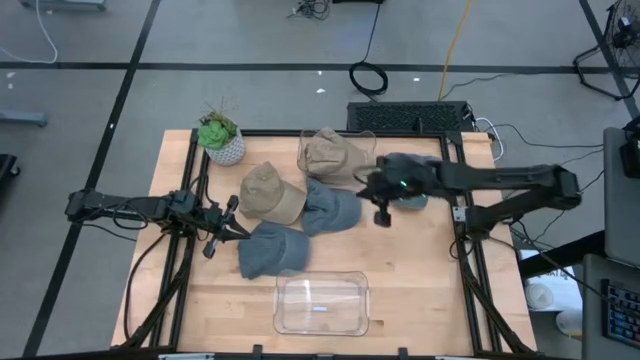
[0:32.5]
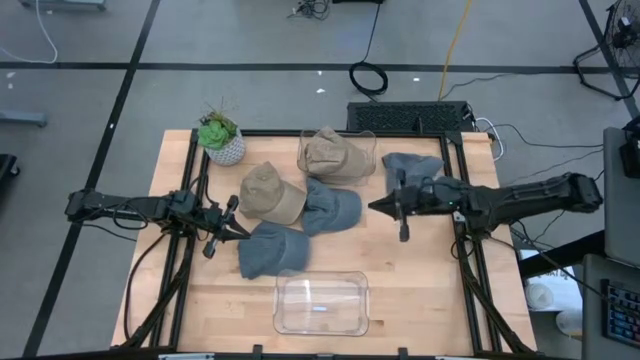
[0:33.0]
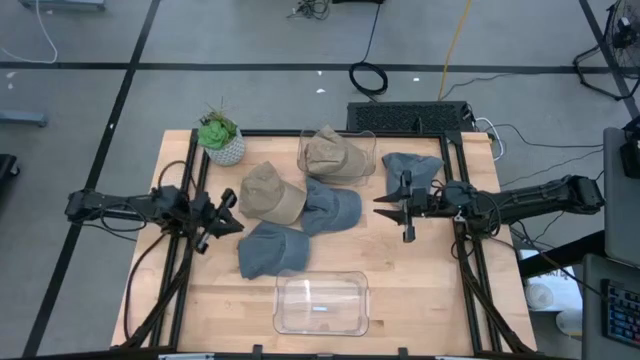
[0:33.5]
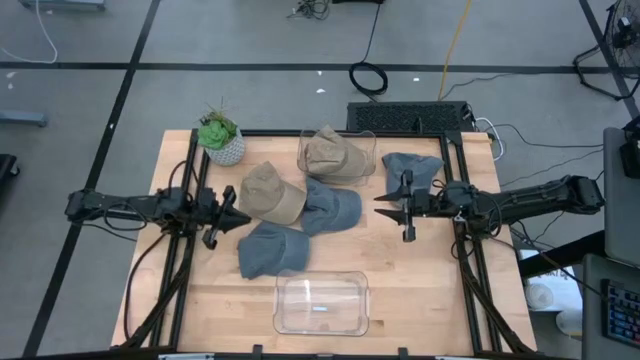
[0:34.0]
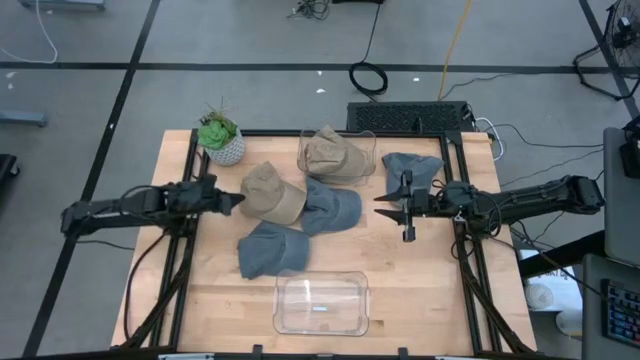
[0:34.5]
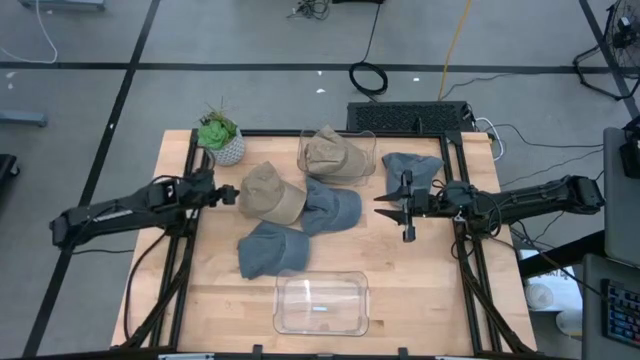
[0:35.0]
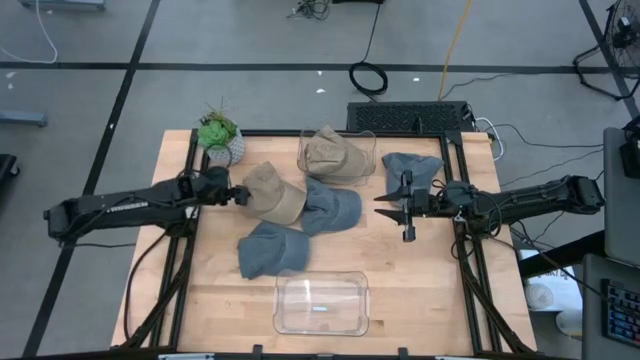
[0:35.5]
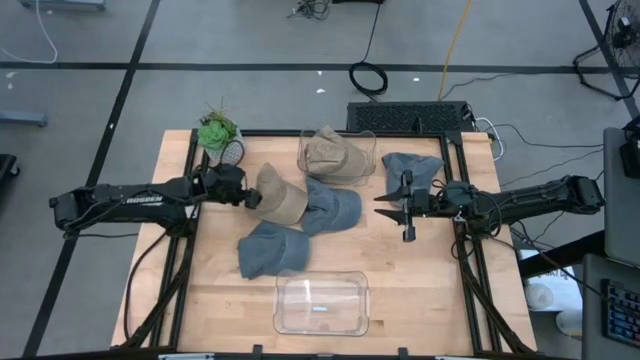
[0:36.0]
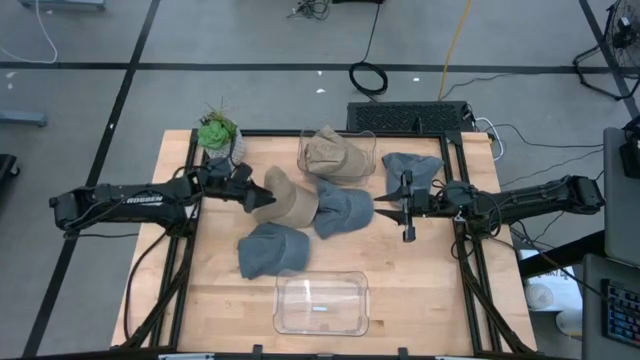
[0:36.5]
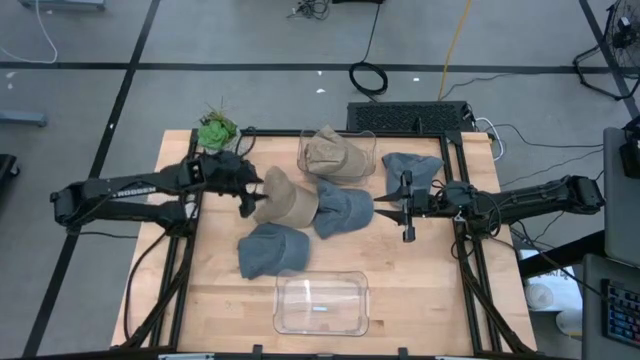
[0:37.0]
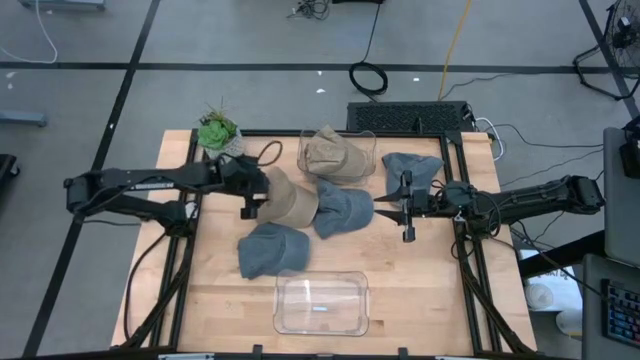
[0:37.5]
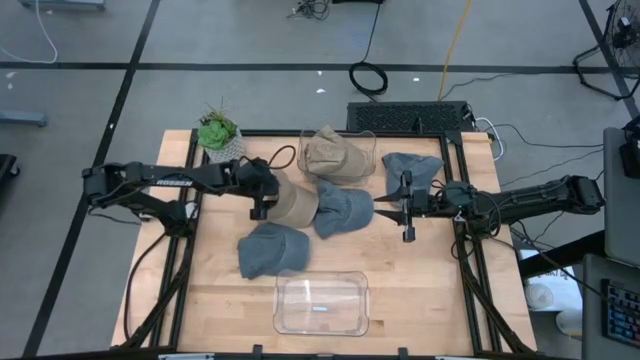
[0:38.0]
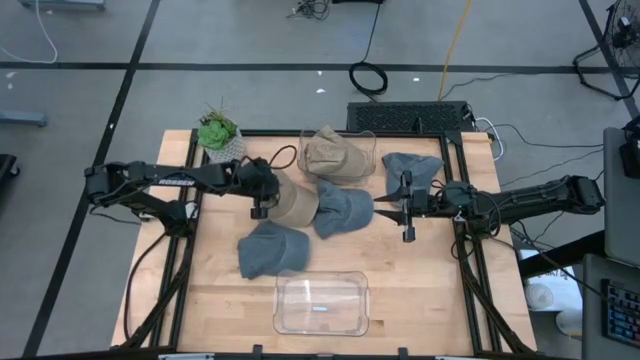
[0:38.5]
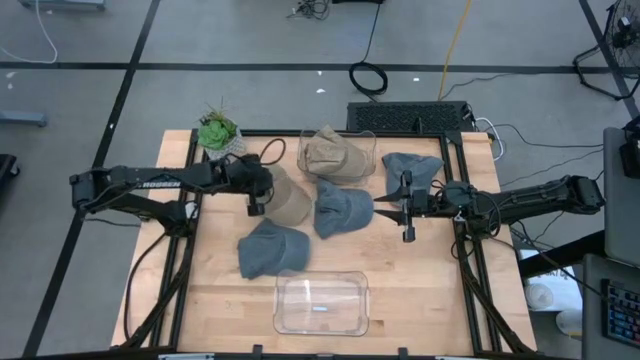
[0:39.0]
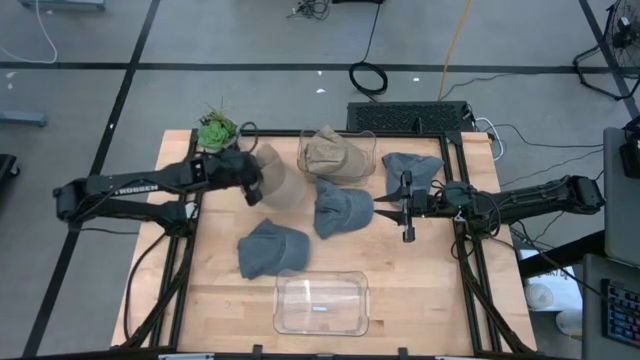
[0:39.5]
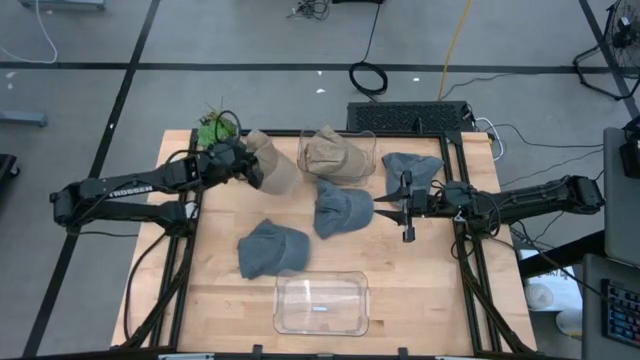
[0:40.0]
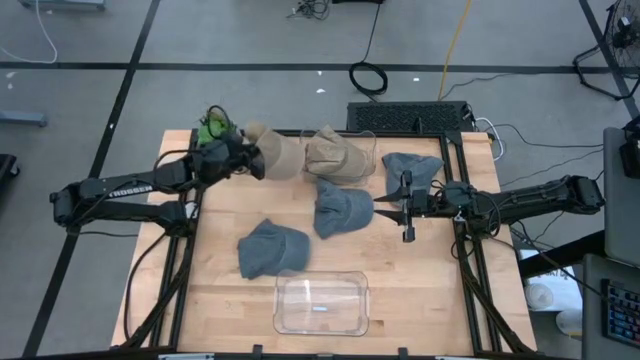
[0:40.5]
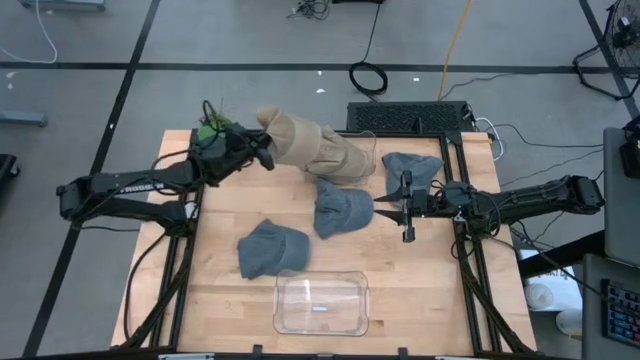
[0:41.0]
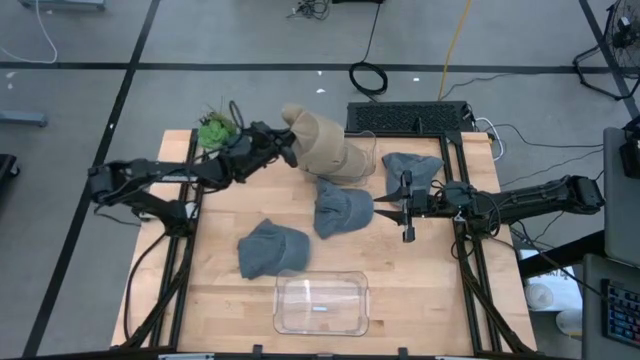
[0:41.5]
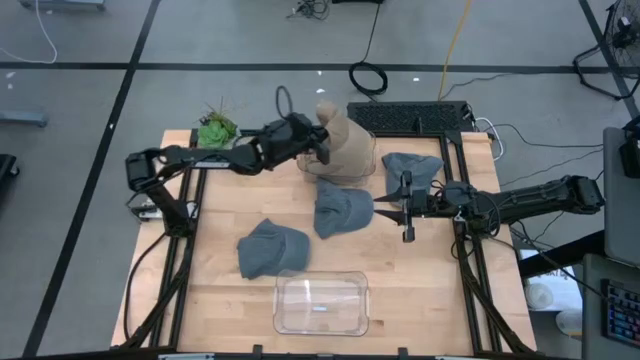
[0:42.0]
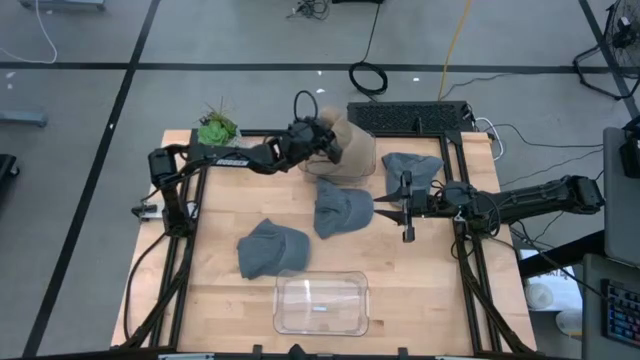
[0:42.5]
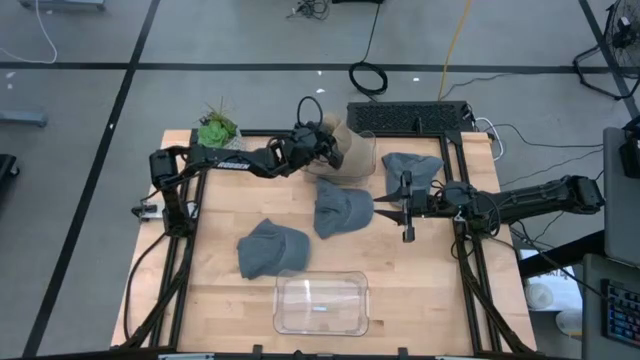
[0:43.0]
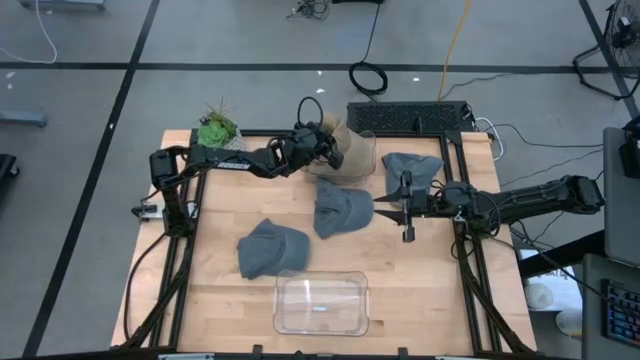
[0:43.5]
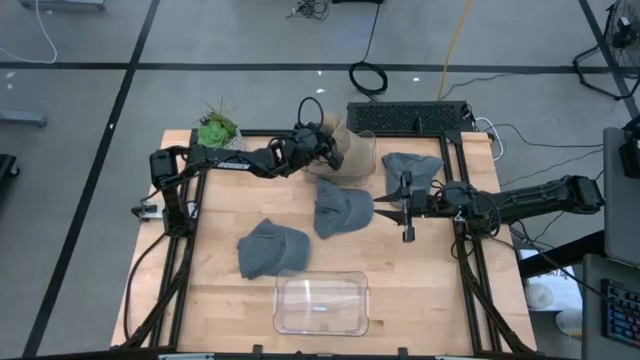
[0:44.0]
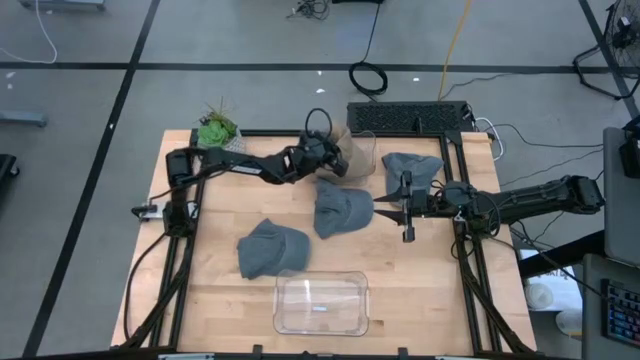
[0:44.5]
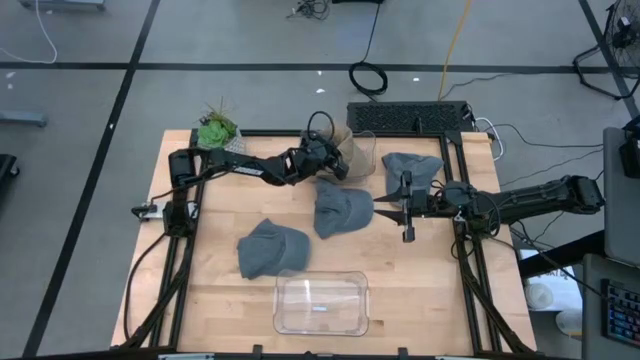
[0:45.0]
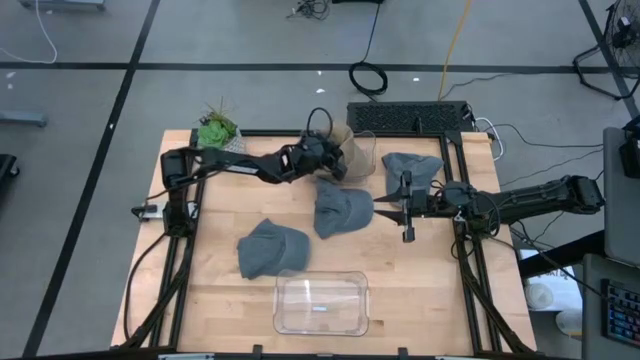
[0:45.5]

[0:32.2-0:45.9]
Task: Pick & Place hat
Put the brown cap into the top transparent bin

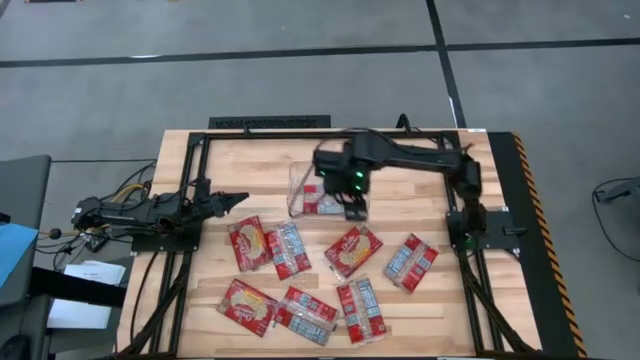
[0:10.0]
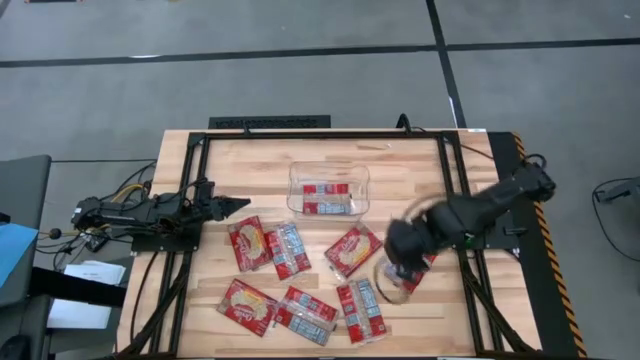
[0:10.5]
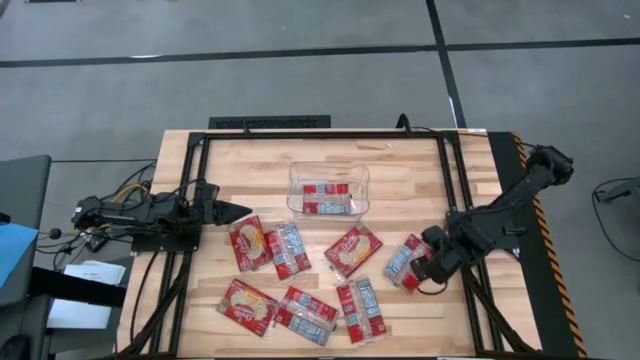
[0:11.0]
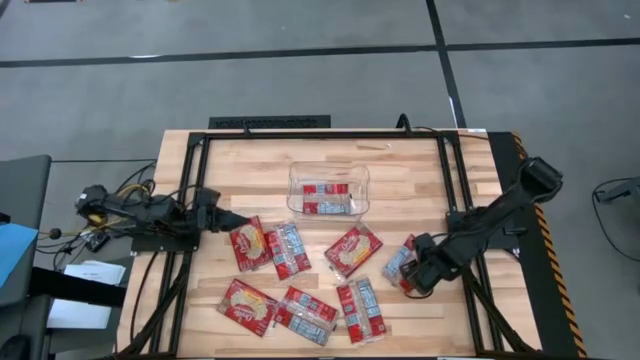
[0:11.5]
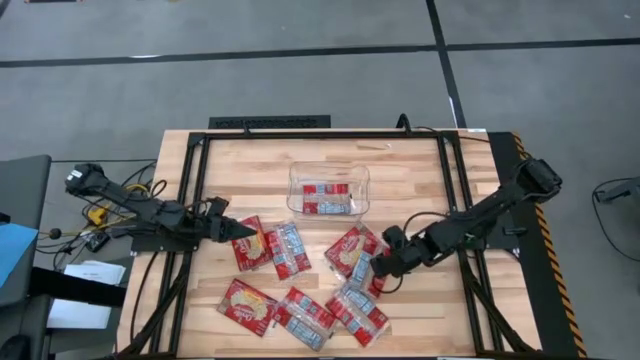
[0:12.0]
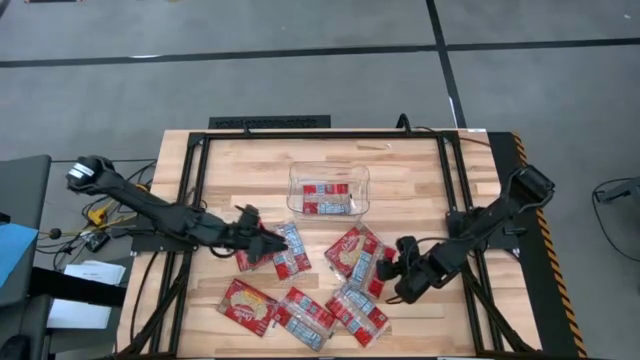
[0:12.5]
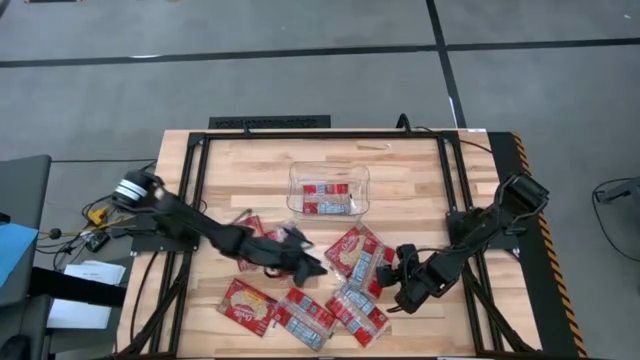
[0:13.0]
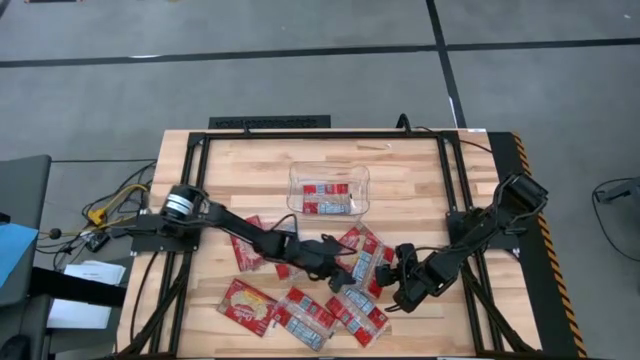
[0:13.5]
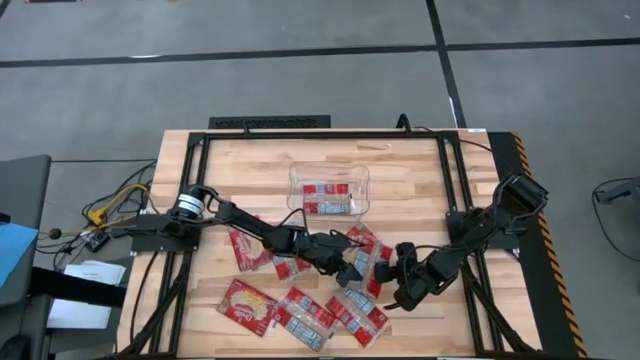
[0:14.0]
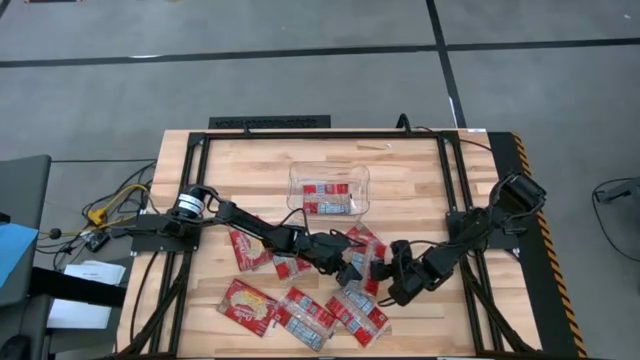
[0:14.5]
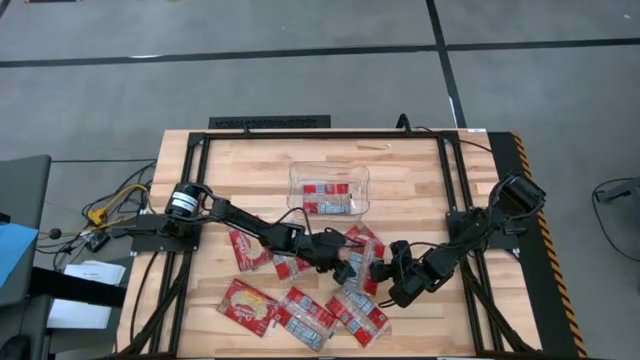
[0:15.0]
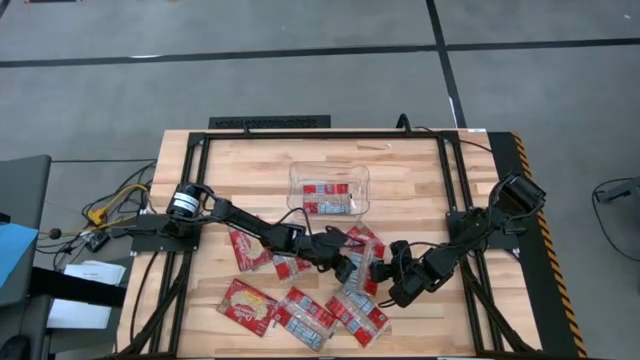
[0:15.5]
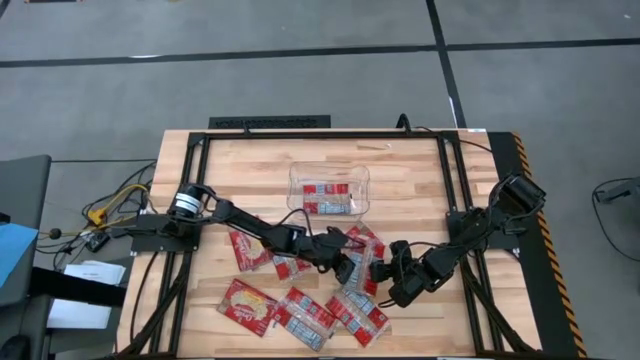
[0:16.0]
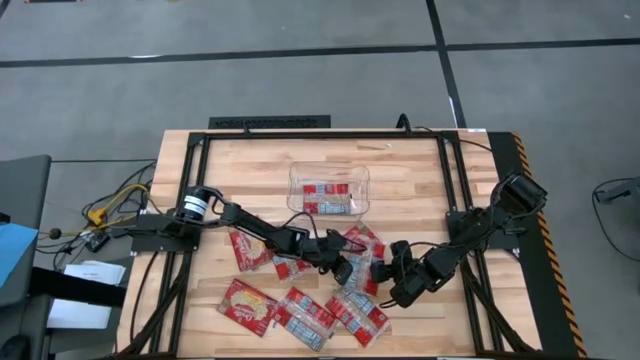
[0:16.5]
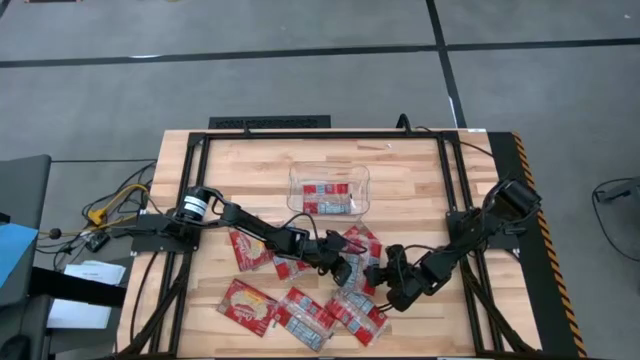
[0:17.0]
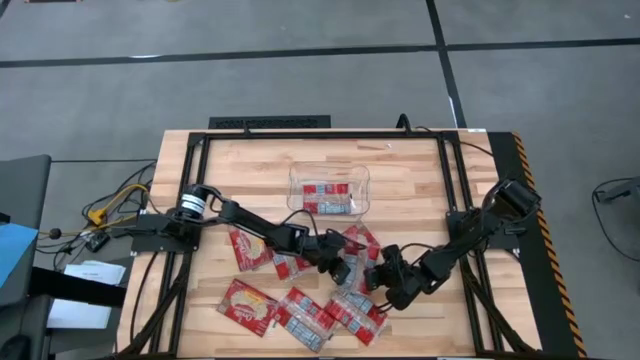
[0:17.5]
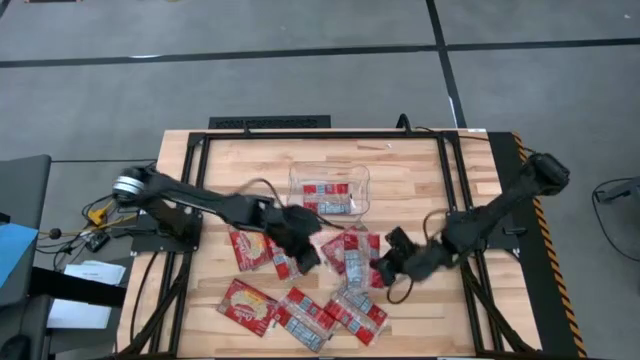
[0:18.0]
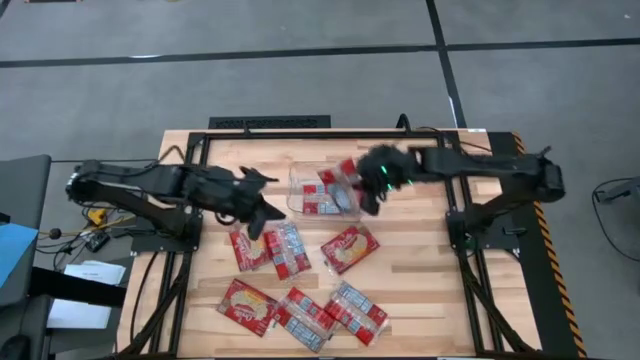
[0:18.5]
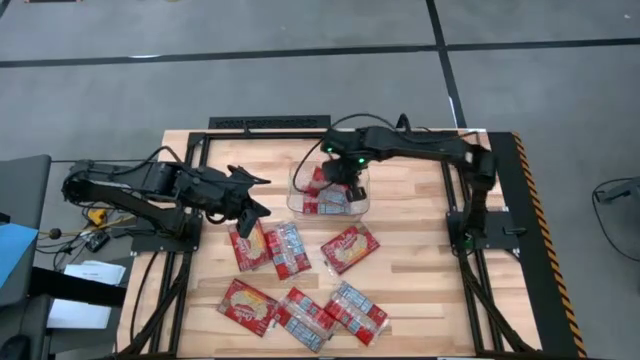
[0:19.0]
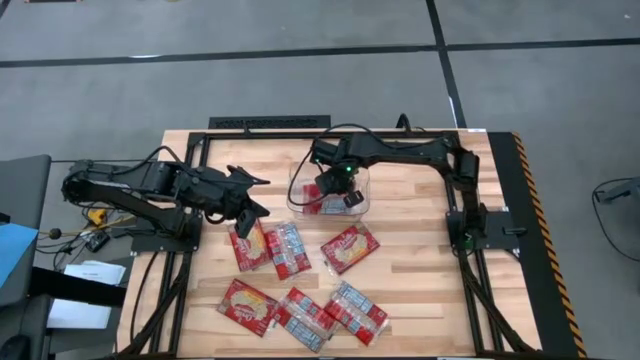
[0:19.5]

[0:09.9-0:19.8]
Task: Sort popcorn bags into baskets
Put the red popcorn bag into the transparent bin
